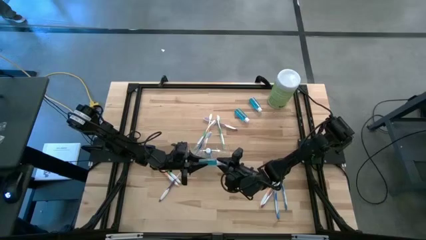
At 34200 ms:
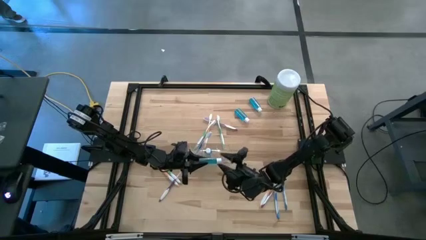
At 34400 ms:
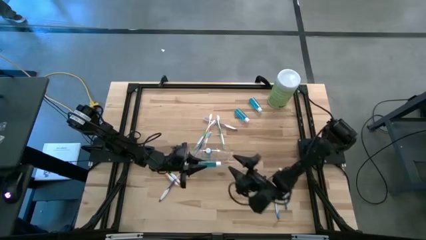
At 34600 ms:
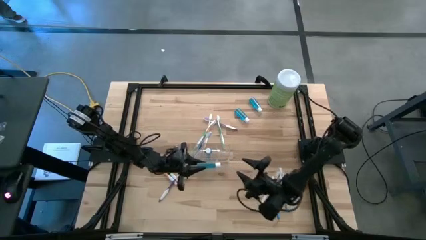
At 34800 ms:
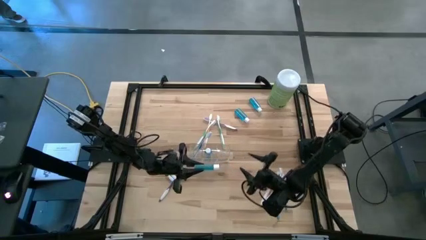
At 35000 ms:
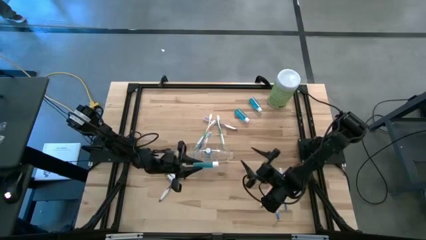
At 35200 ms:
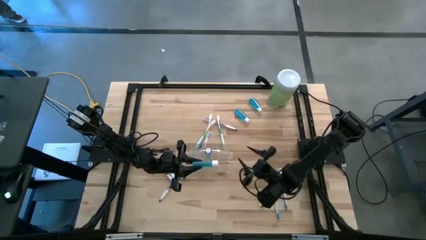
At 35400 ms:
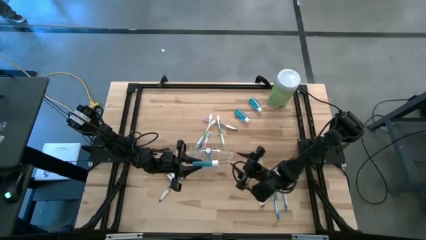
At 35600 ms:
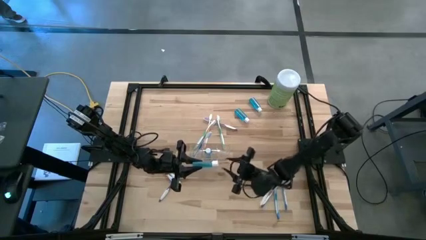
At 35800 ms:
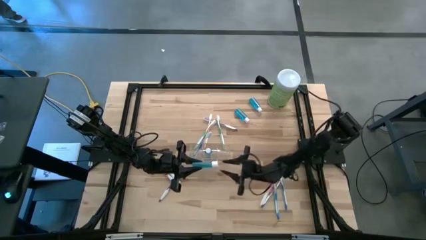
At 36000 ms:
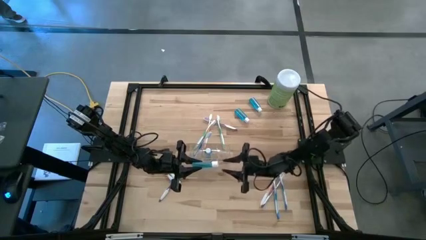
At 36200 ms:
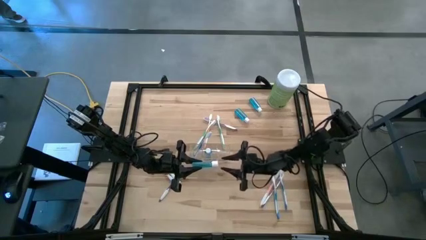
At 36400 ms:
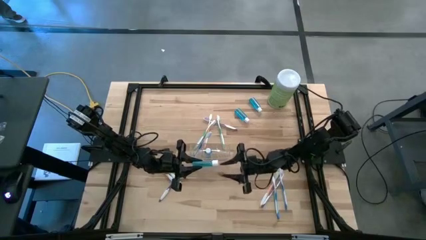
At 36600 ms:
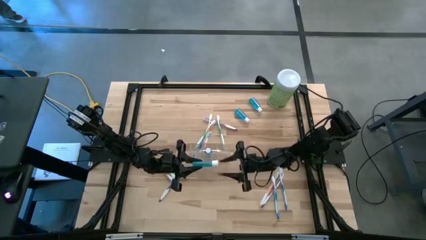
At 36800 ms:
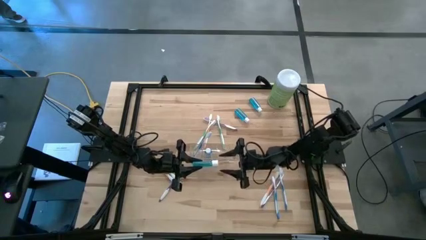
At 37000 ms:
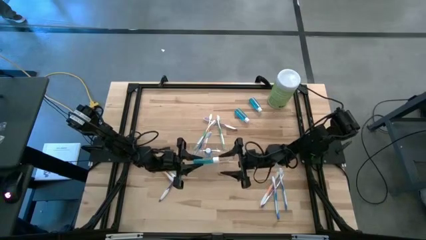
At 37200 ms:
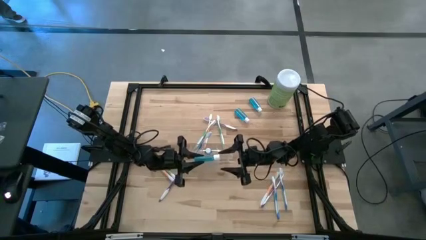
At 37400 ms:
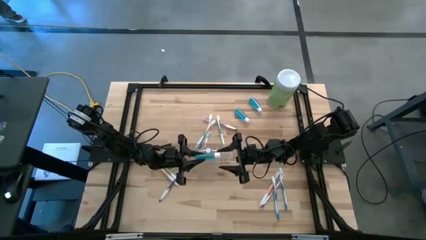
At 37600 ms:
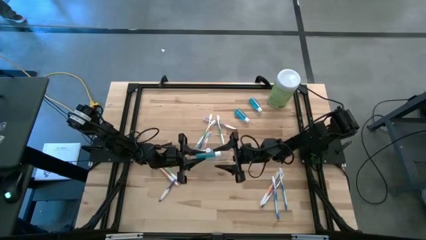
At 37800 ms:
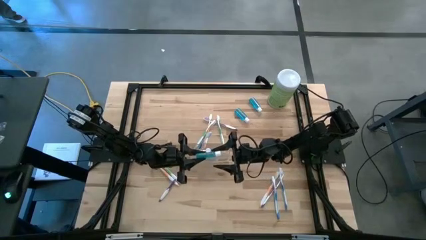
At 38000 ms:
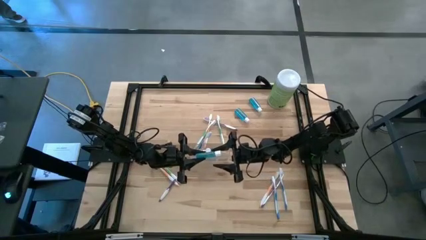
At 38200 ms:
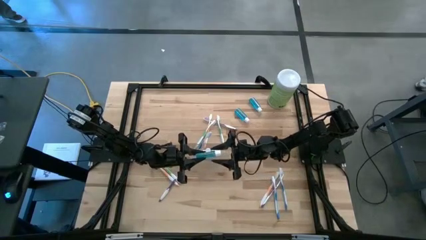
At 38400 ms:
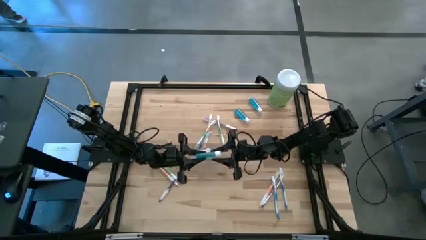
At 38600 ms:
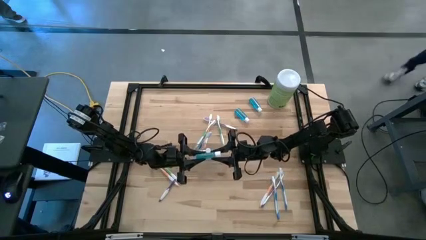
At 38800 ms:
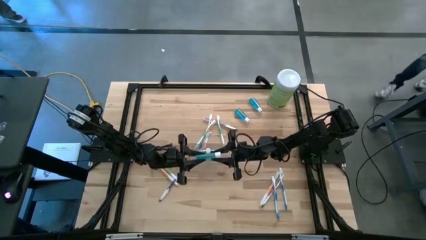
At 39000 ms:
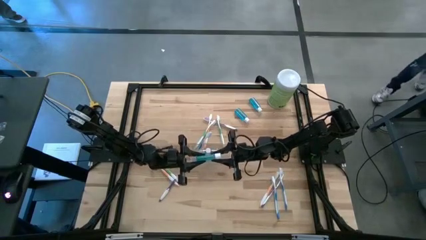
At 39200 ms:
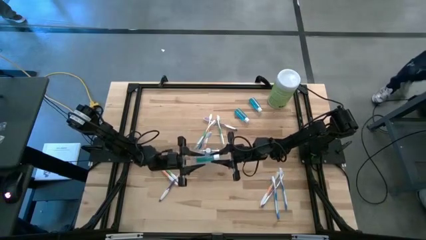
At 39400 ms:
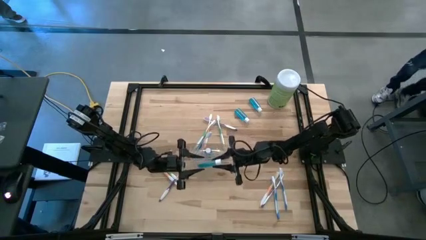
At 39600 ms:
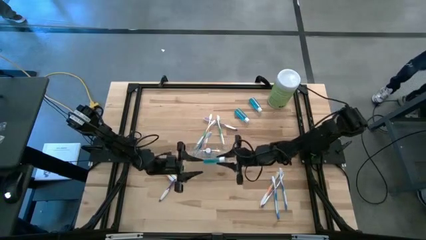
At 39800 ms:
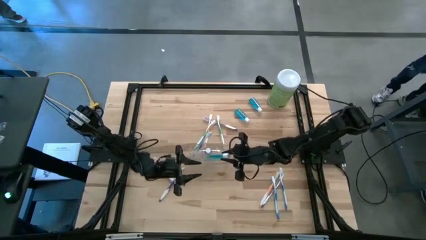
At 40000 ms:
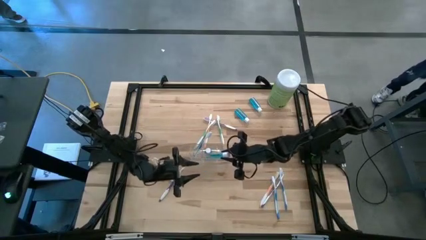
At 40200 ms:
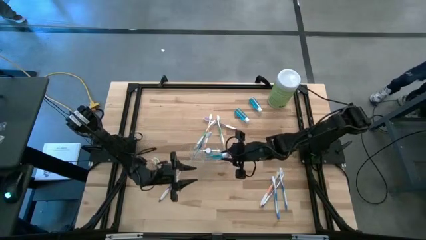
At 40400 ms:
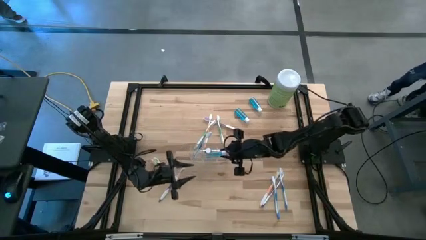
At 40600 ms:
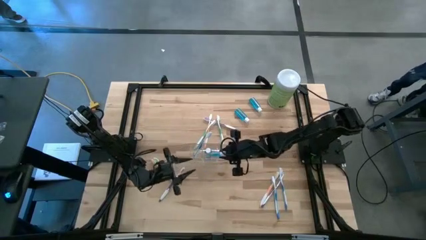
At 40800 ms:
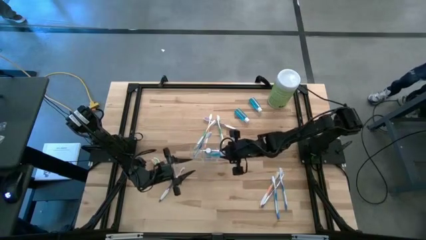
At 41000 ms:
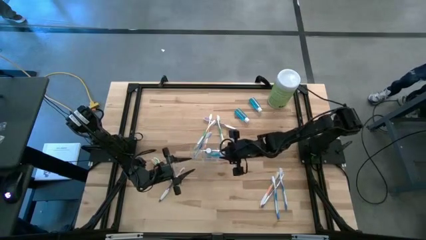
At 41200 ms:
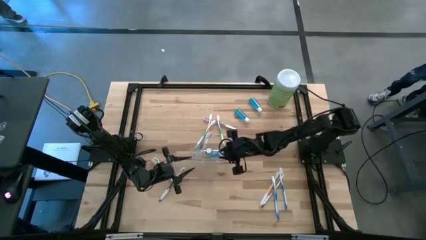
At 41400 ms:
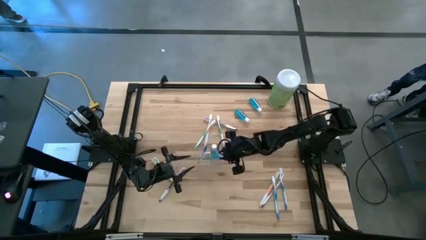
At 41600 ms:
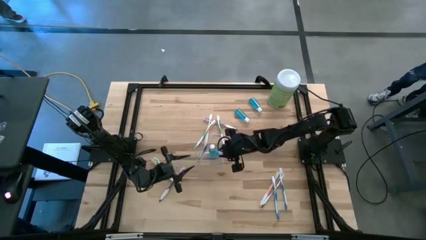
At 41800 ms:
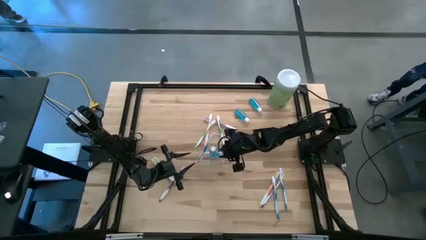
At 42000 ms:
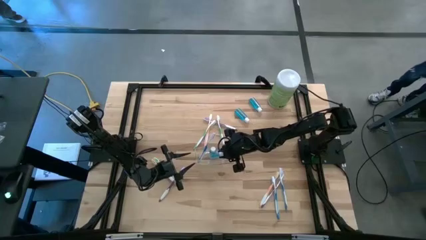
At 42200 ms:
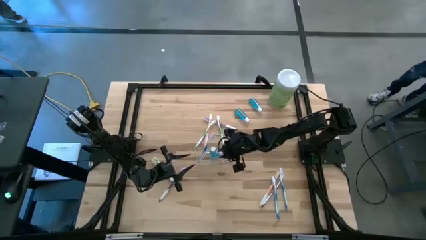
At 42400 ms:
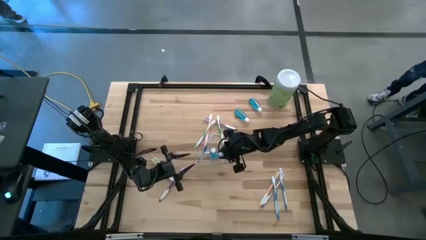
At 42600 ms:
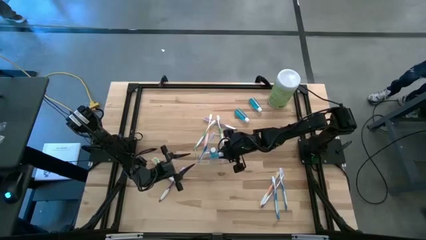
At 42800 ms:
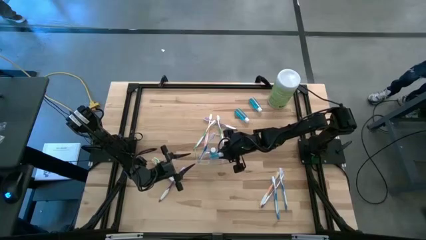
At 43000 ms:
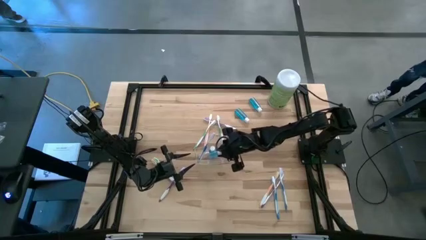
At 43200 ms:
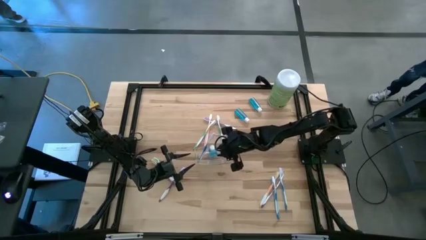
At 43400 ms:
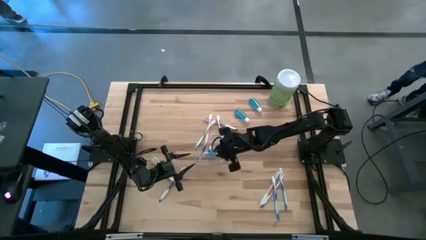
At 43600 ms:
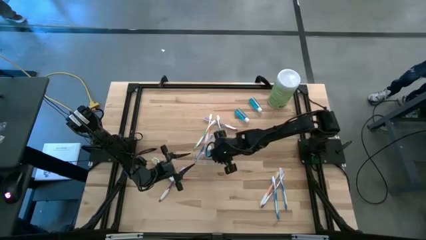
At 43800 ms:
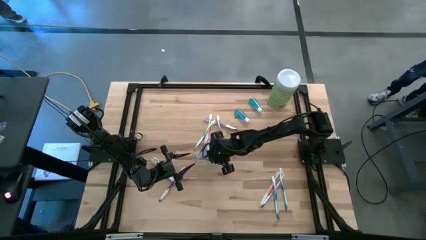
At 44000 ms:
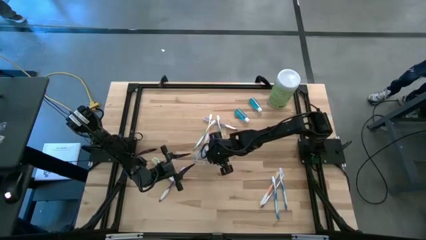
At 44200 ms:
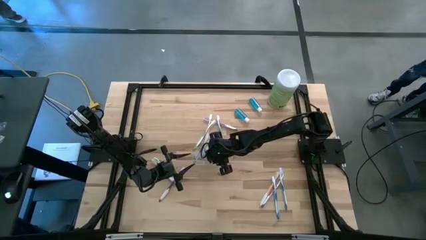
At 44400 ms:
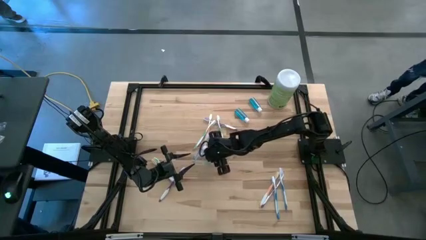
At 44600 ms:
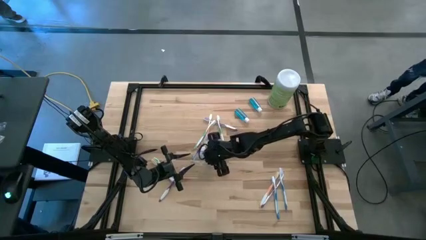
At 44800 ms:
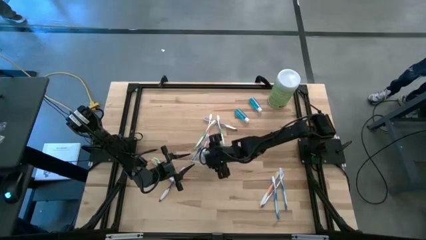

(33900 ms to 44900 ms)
Task: Pick & Place toothbrushing station
Put the mouthwash into the center of the transparent organizer
